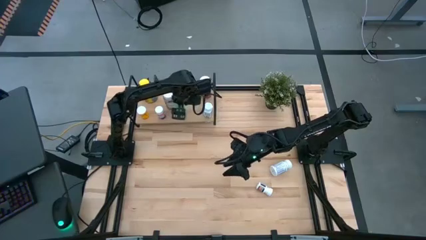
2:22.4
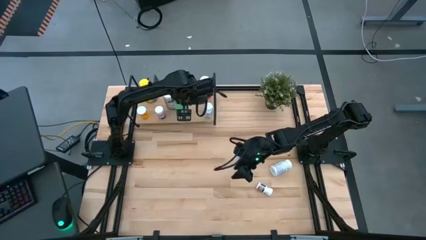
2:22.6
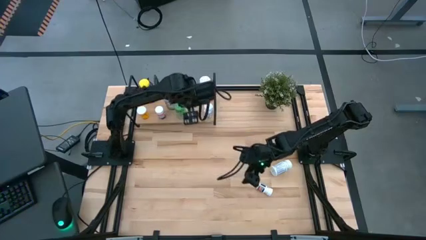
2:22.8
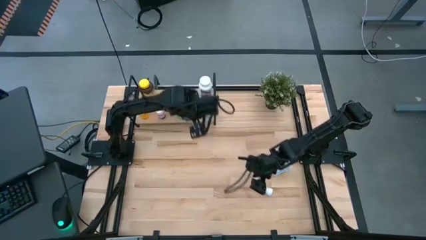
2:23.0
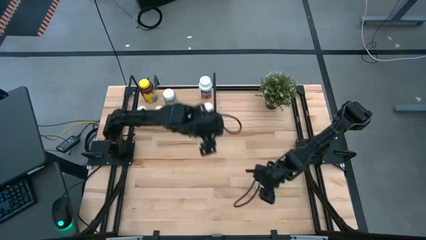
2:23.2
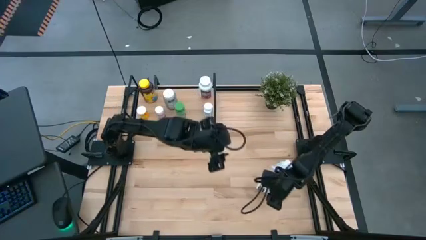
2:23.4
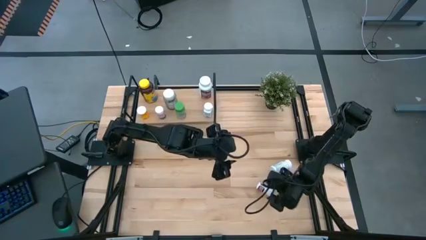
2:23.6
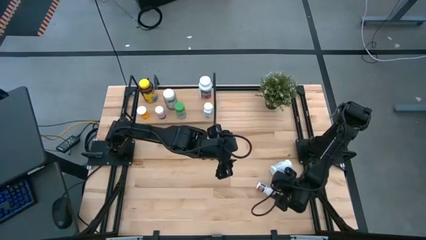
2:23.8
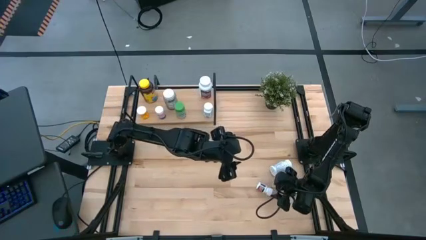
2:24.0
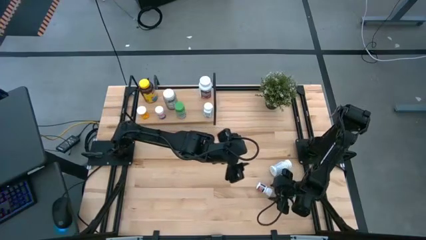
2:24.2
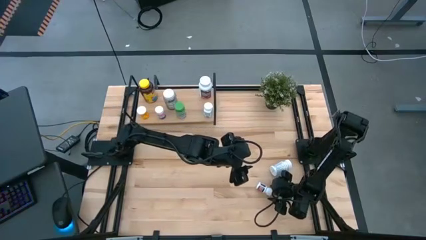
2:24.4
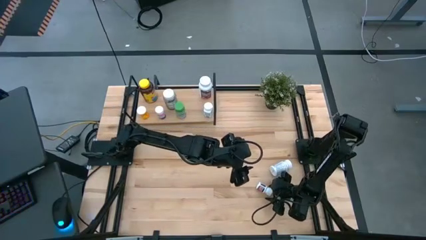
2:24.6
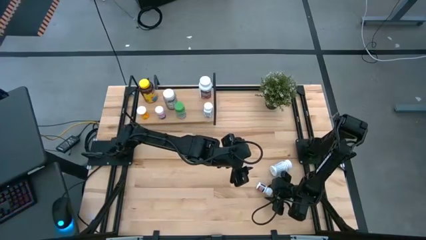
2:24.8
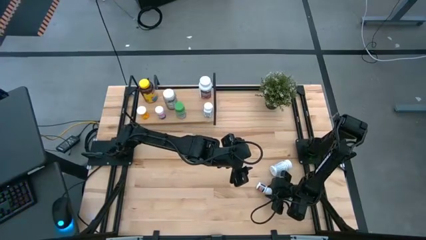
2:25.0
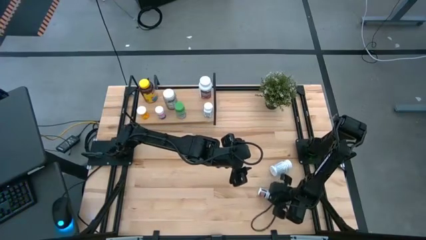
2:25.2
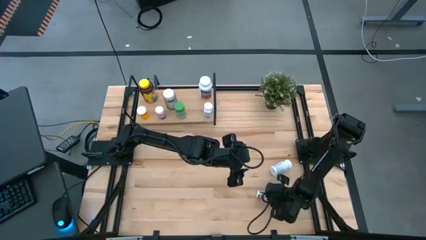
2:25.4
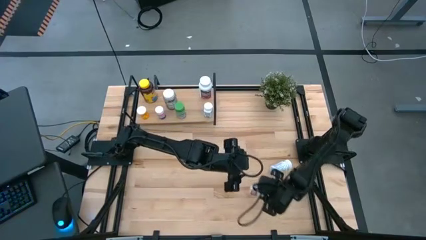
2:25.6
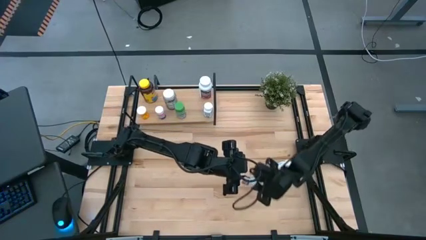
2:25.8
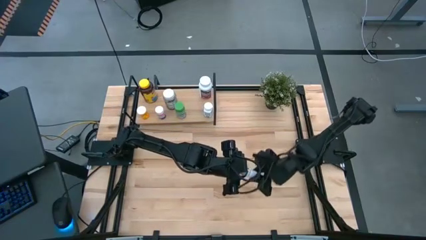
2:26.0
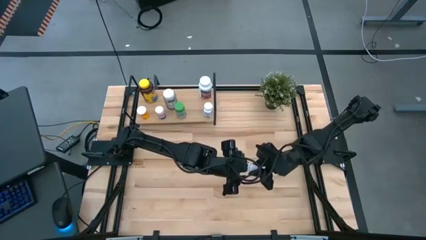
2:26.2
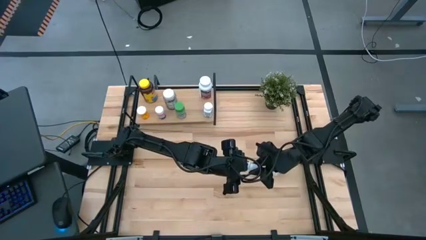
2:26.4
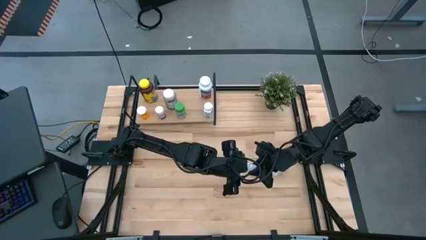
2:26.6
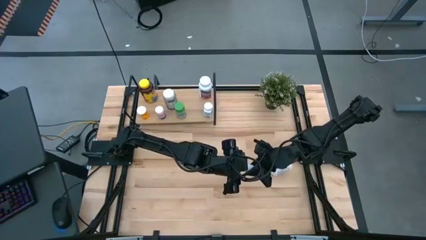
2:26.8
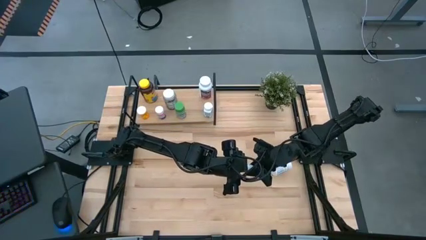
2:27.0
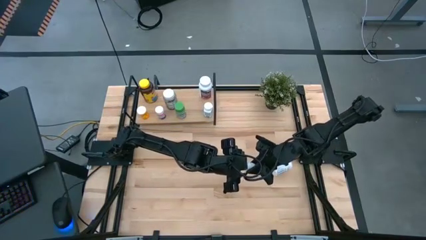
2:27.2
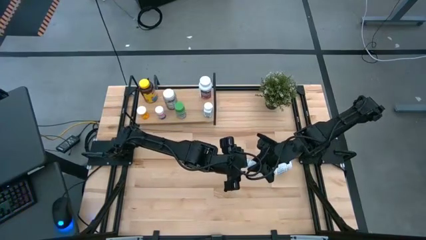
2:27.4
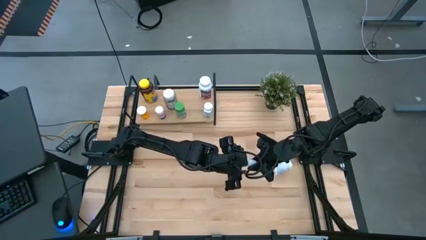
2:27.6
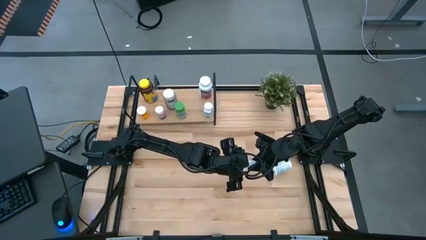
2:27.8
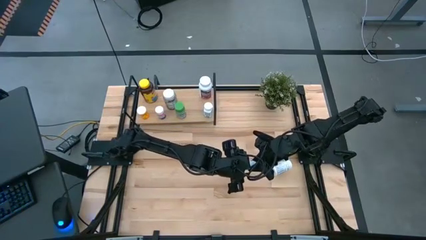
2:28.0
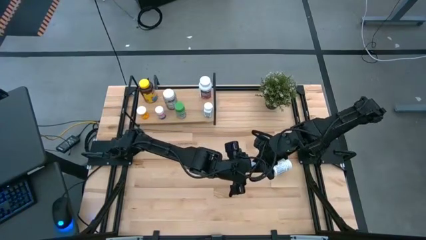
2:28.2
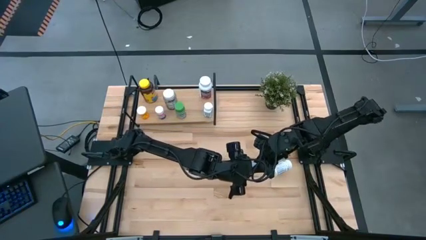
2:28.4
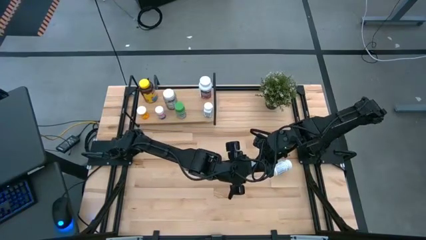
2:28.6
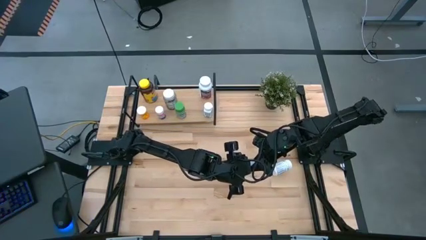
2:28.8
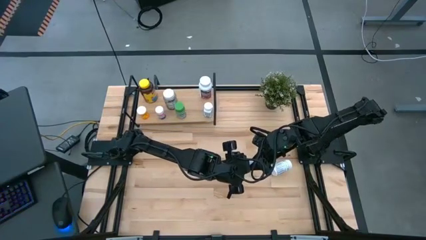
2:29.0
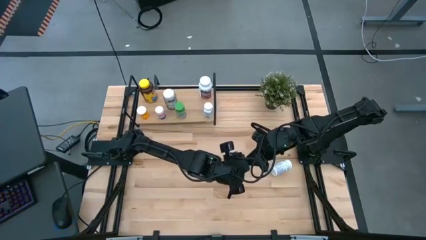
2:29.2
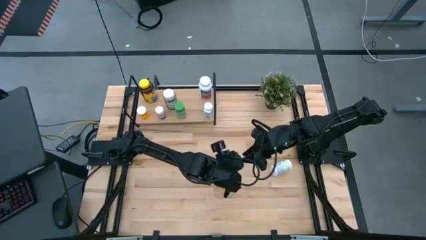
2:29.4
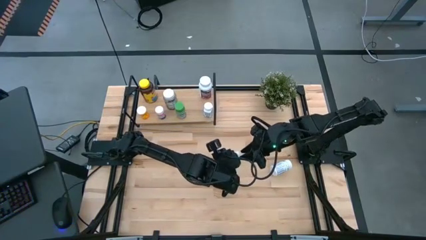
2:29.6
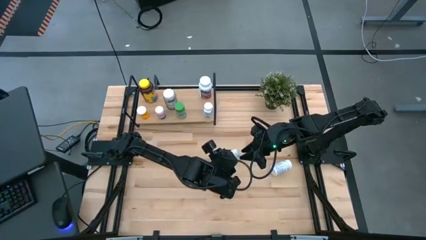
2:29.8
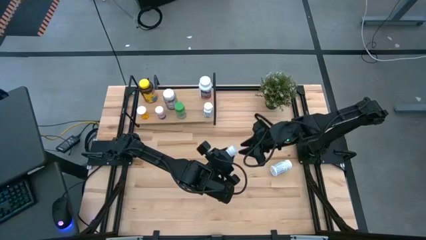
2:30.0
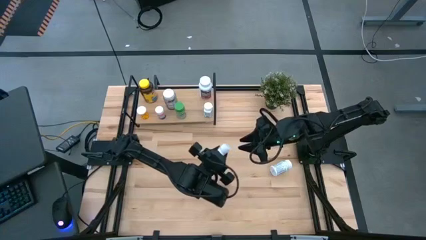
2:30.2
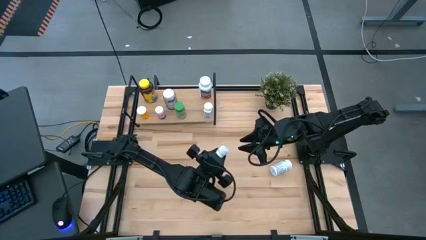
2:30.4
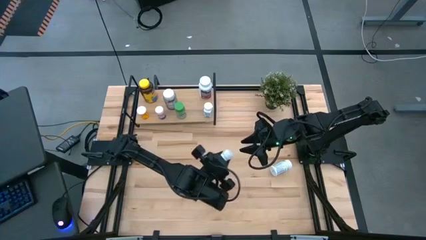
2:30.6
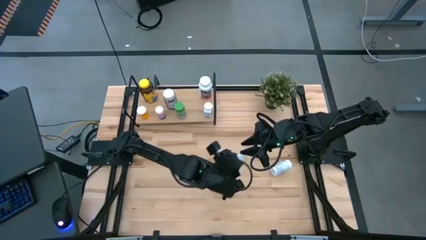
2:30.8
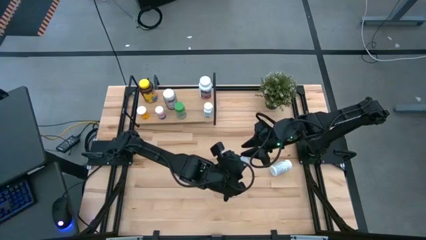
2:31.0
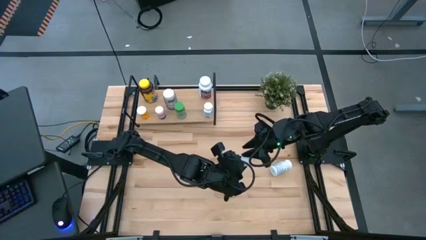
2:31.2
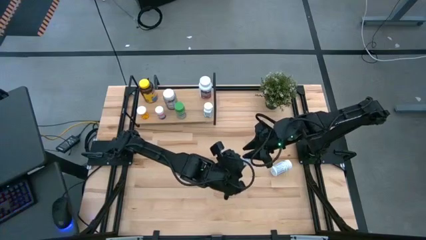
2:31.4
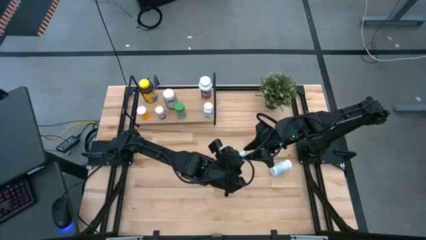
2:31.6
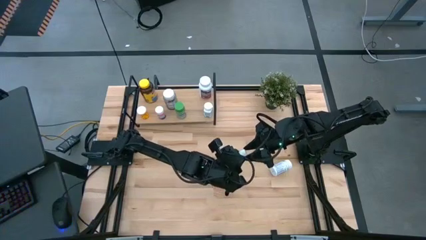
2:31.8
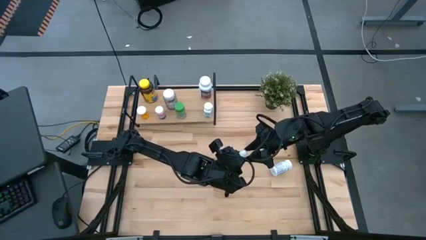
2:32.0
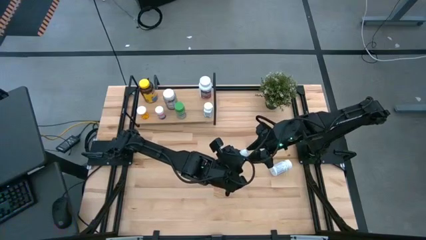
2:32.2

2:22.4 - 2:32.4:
Task: Pick and place medicine bottles onto shelf by color
Put the black medicine bottle on the shelf

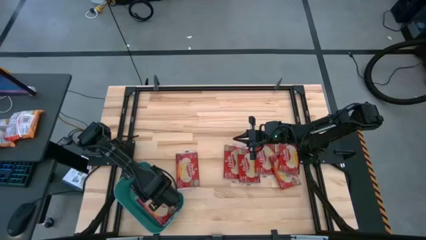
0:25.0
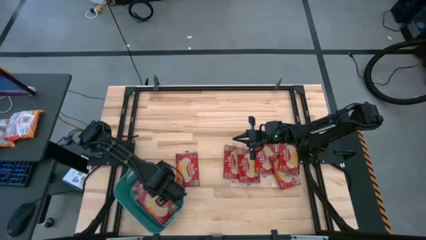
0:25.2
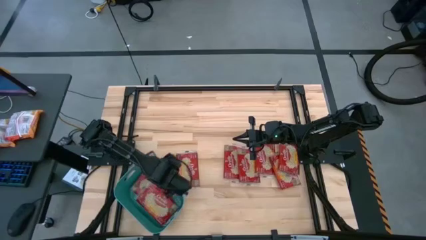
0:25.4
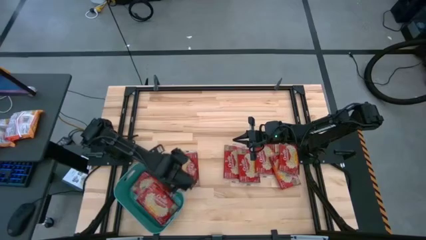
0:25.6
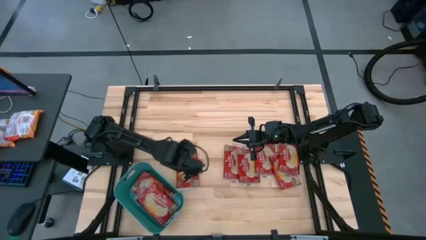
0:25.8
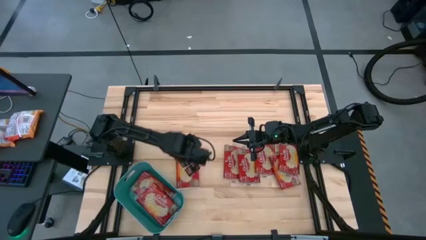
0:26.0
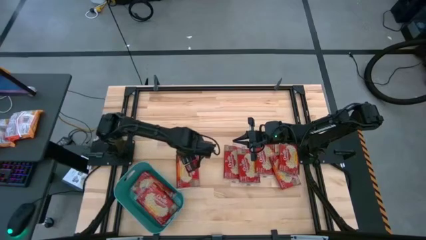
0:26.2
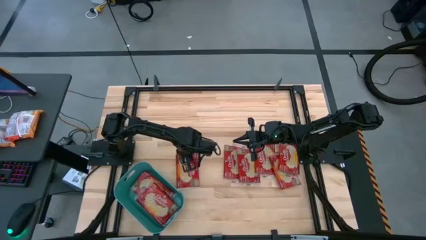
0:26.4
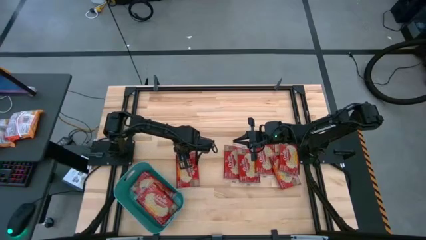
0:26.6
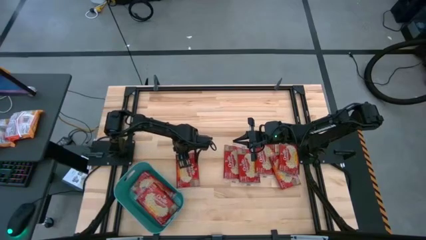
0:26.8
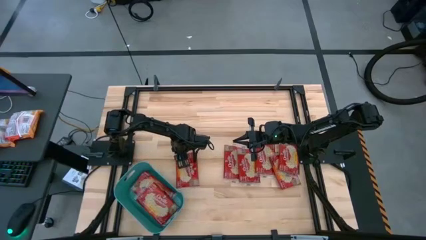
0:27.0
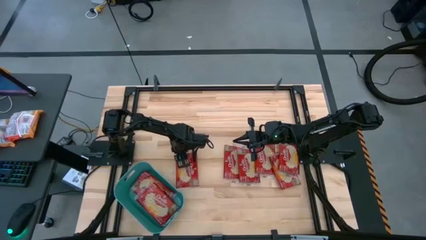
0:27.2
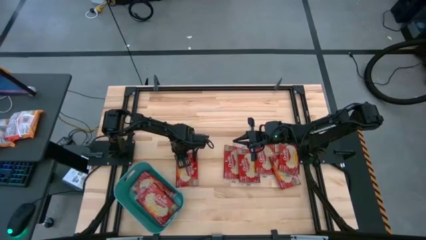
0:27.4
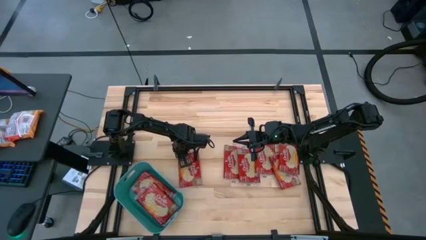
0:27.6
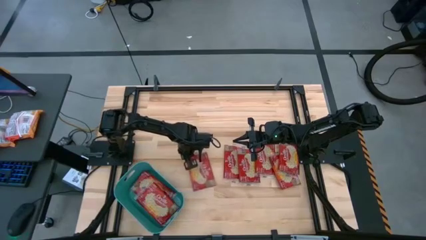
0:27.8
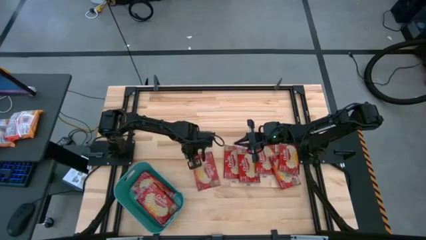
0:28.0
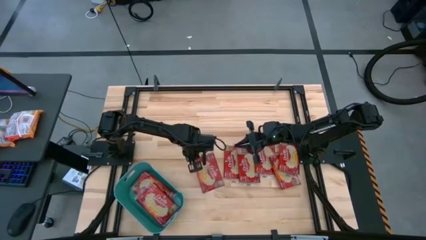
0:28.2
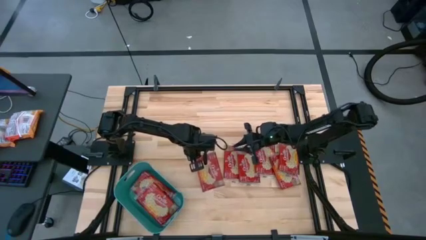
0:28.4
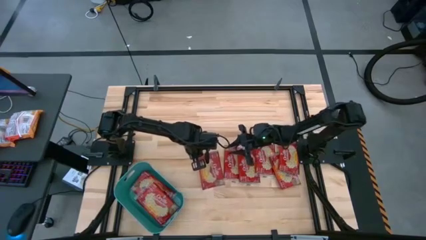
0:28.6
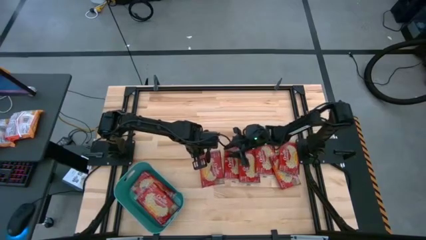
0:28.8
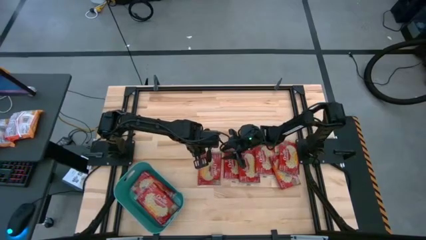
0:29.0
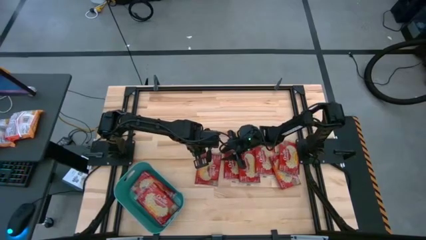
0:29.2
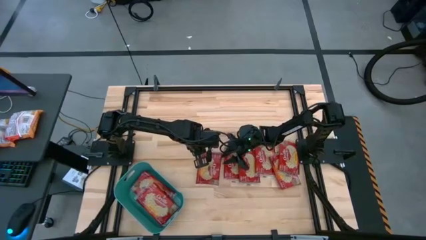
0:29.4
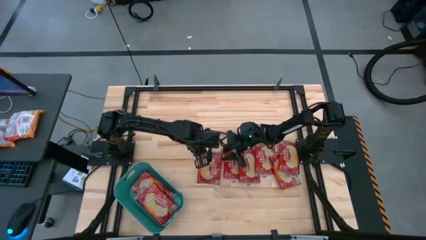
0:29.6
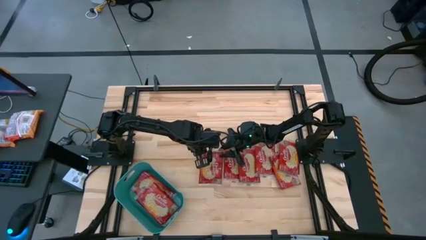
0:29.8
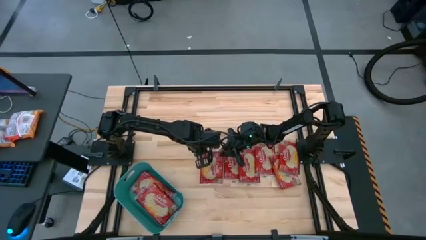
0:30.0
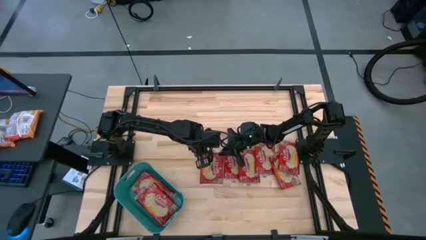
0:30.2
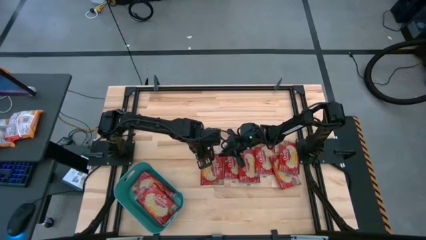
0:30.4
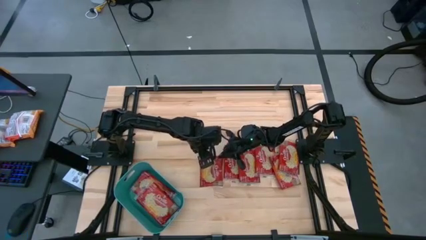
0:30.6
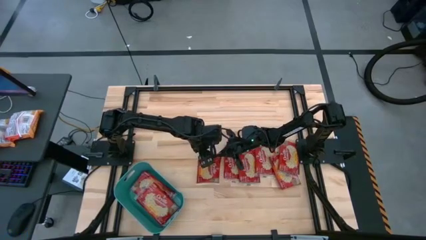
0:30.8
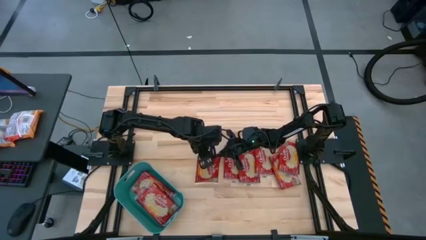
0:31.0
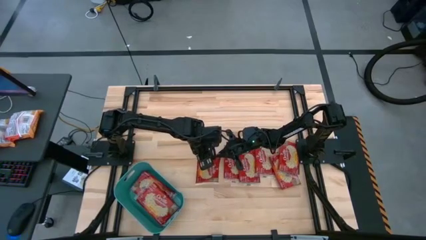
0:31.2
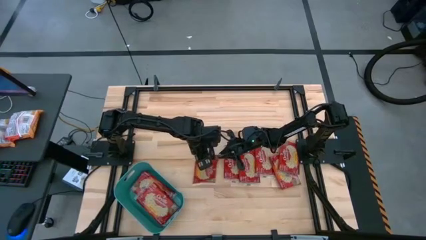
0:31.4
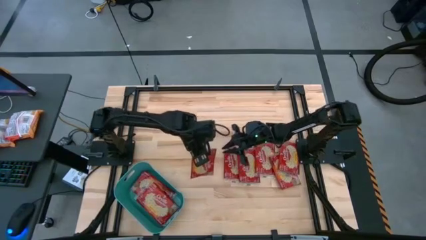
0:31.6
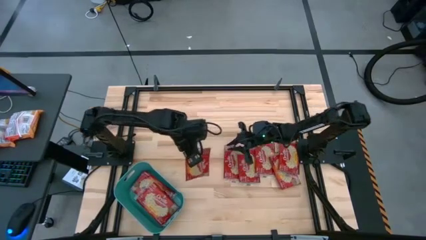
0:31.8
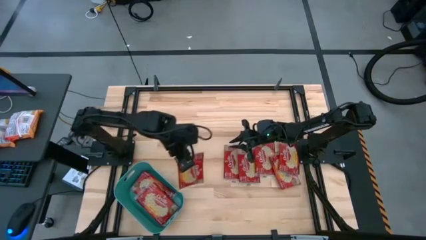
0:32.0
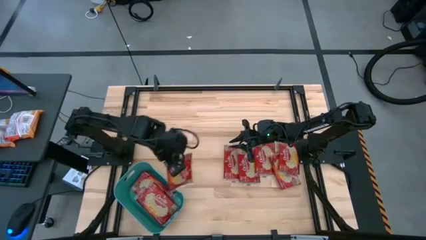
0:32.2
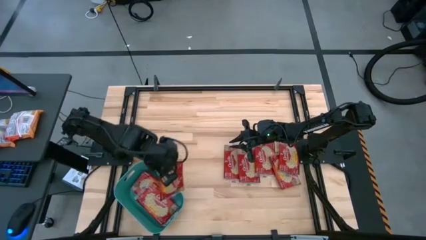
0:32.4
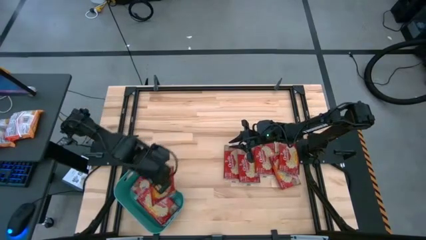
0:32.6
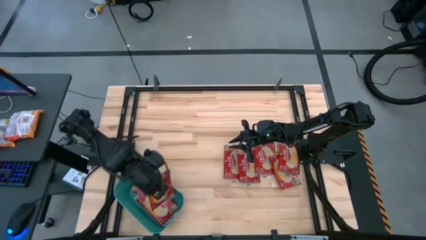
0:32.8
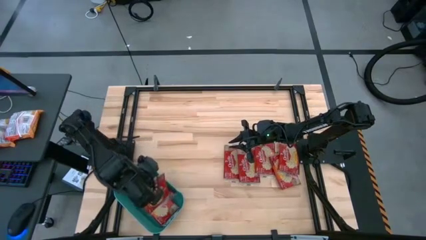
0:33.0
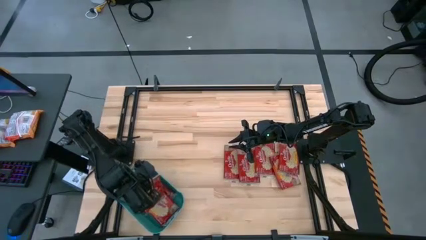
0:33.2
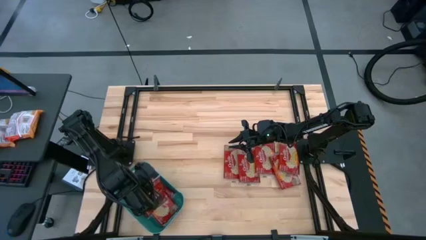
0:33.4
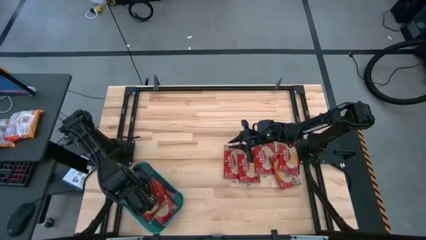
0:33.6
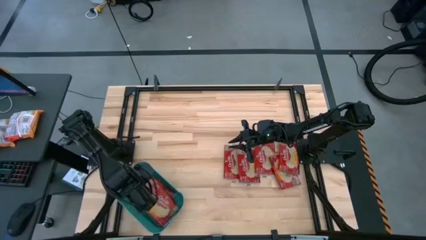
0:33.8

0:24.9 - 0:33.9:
Task: Sort popcorn bags into baskets
Put the popcorn bag into the blue bin
